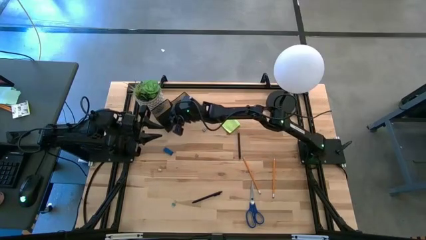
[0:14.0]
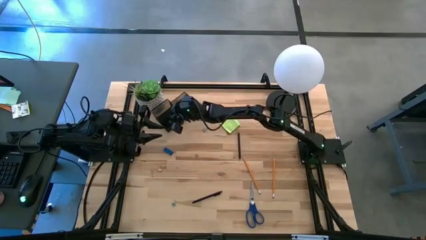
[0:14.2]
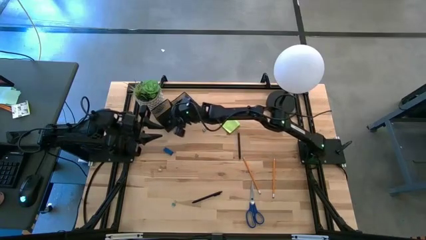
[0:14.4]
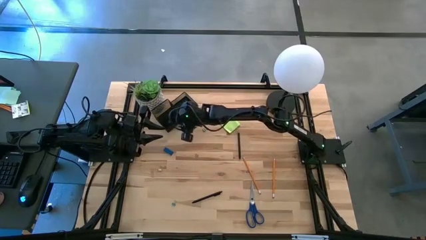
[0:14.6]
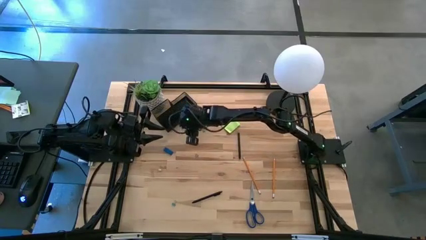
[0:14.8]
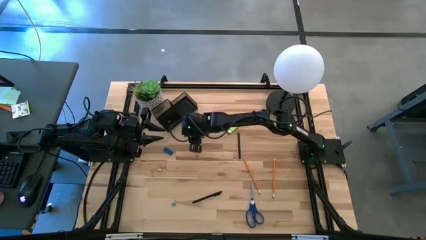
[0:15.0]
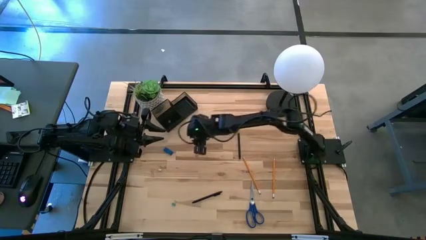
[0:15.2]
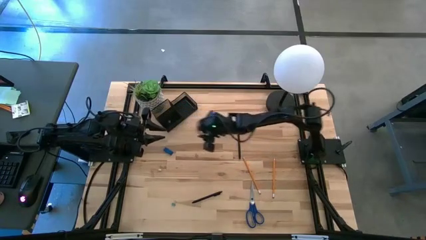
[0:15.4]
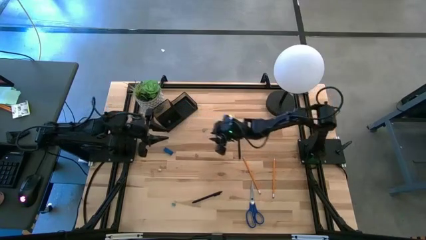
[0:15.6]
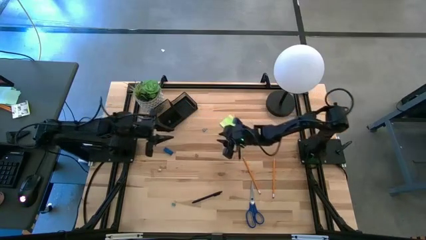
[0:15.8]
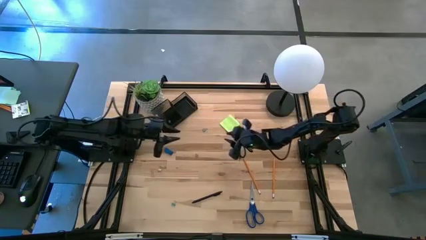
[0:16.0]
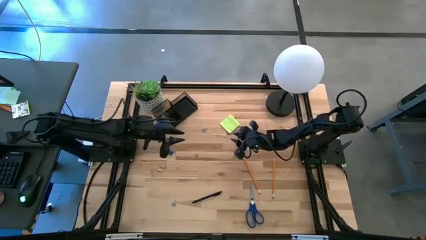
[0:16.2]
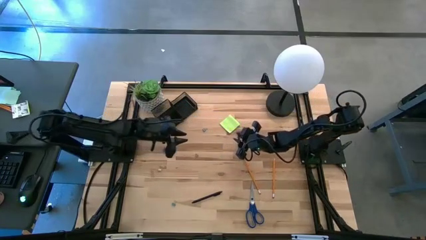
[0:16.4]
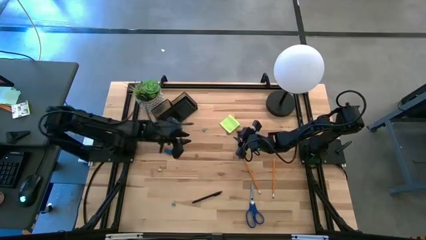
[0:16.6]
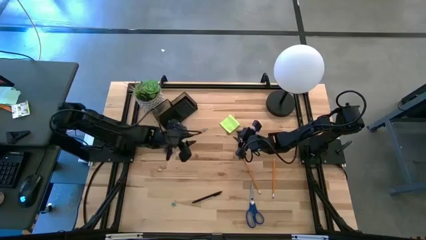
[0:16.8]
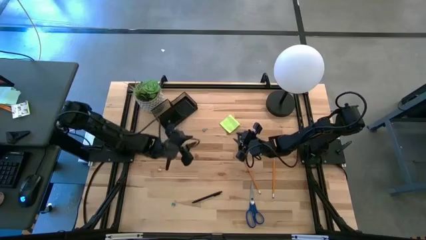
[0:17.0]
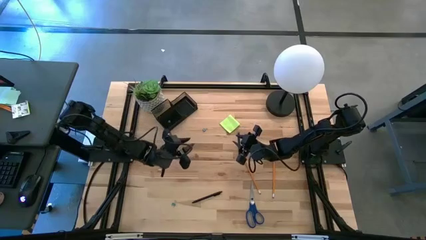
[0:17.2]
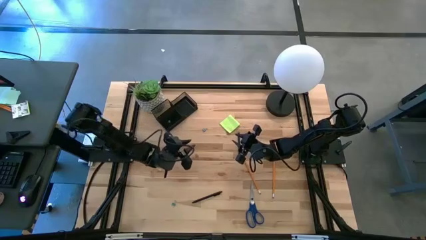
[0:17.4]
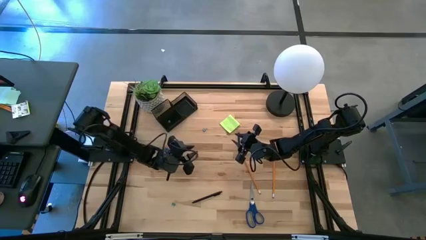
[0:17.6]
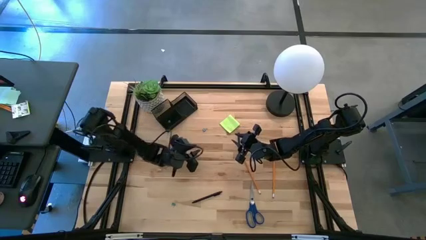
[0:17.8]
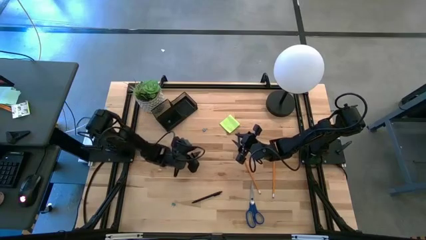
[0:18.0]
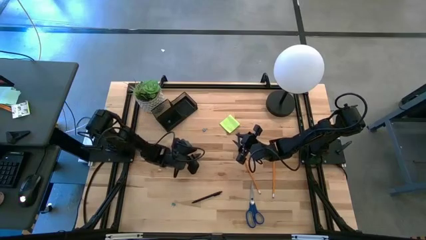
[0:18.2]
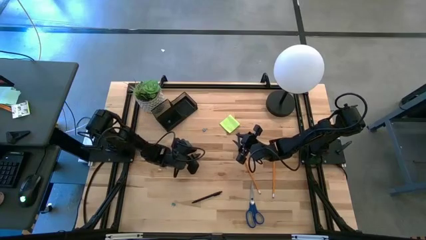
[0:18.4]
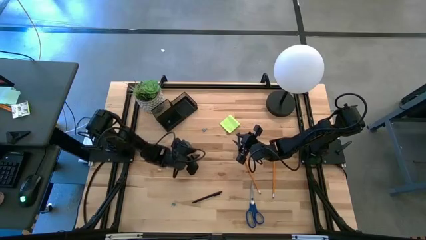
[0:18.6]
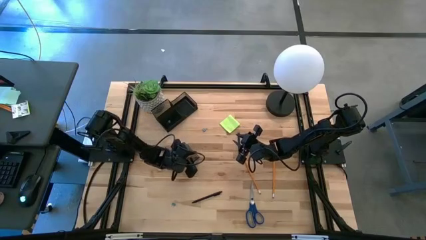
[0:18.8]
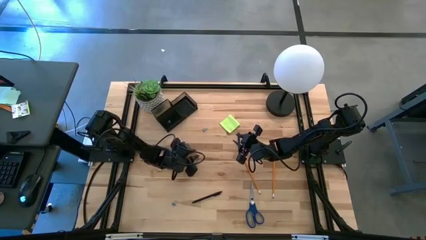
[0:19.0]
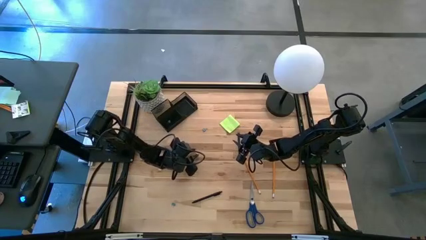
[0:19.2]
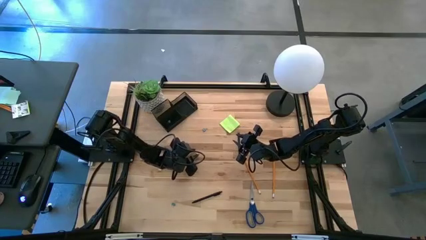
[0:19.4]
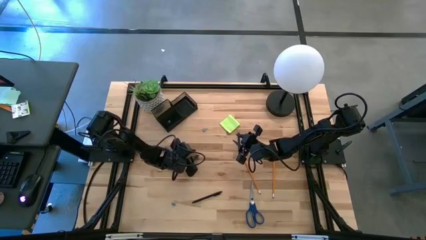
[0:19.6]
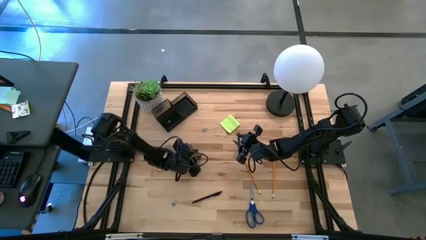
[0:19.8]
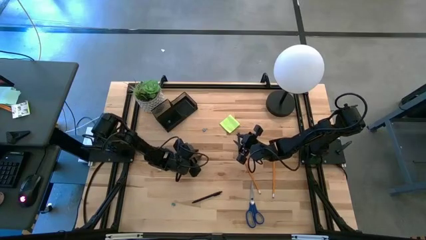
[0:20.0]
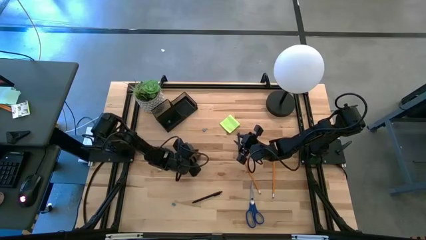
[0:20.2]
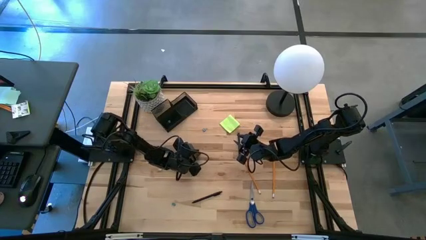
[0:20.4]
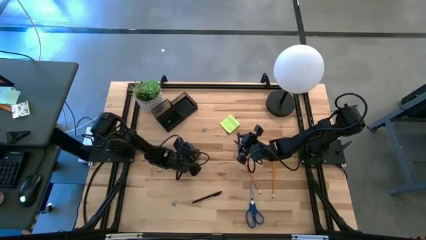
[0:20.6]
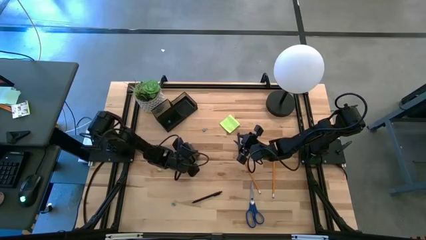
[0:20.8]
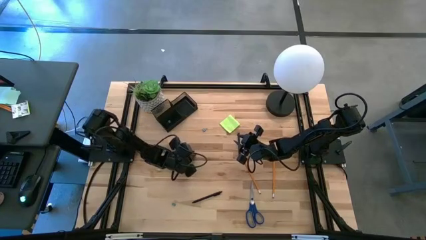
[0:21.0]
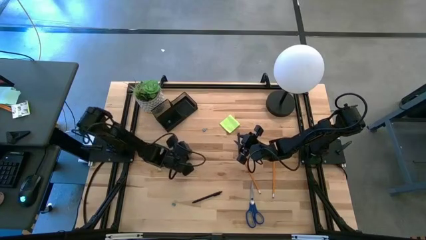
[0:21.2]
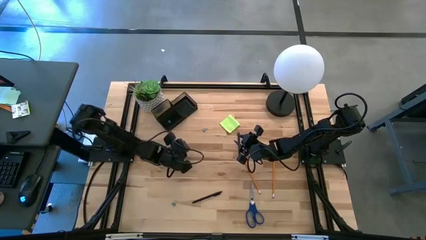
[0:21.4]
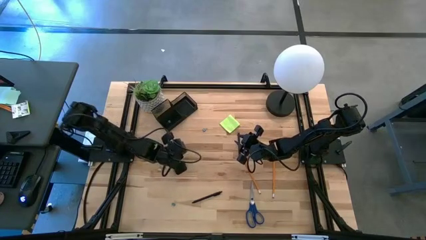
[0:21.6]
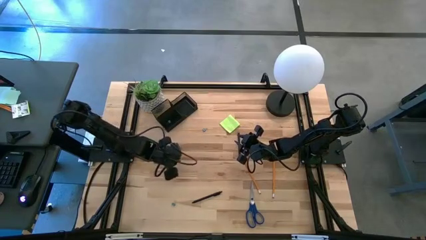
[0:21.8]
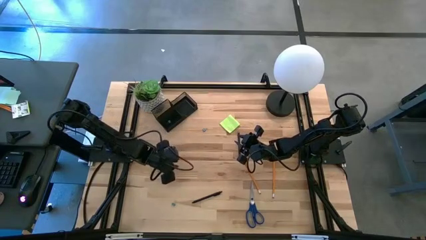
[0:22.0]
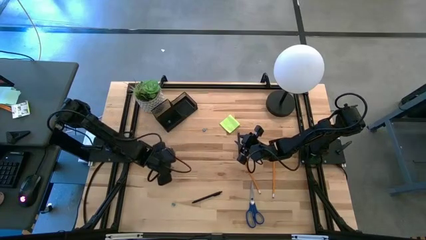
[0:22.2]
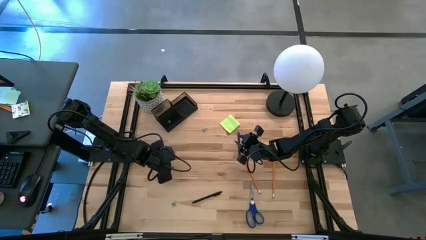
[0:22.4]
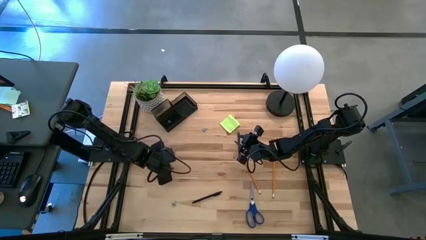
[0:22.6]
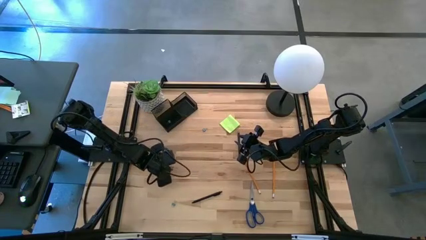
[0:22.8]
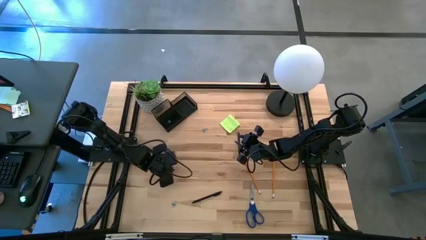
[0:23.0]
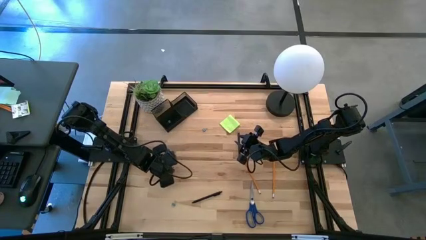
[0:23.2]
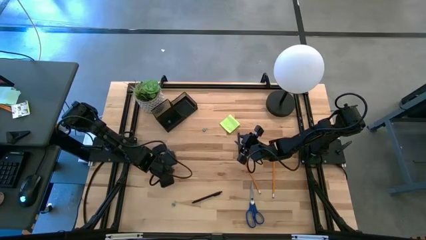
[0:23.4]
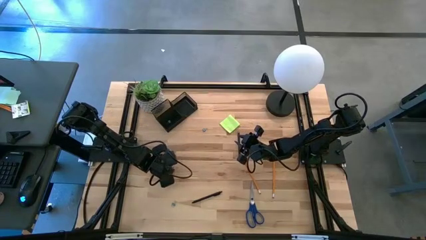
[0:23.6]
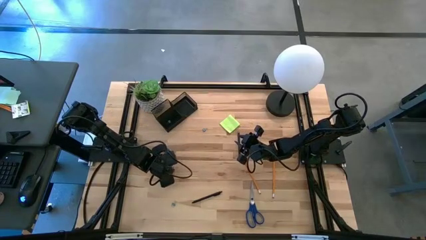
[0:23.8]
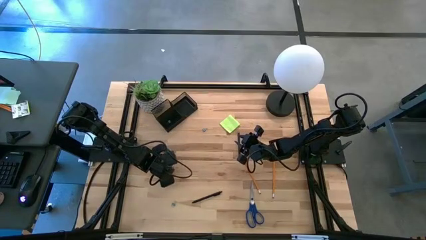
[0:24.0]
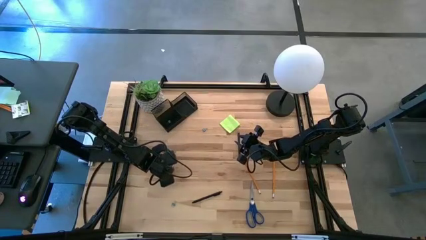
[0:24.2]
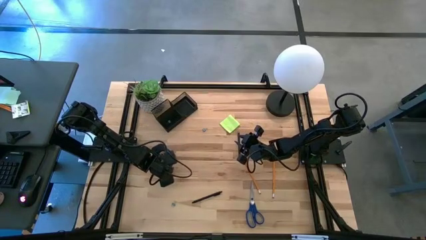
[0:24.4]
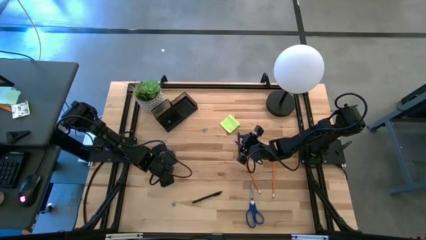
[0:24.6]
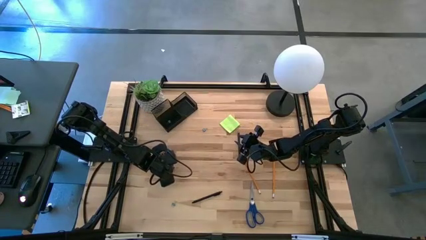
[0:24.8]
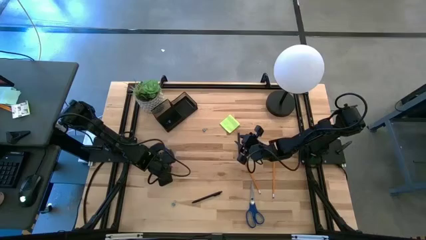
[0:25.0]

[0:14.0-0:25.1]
Task: Pick and place office supplies into organizer
Put the yellow binder clip into the desk organizer

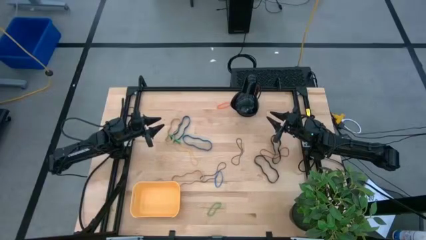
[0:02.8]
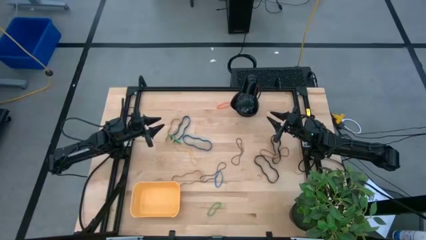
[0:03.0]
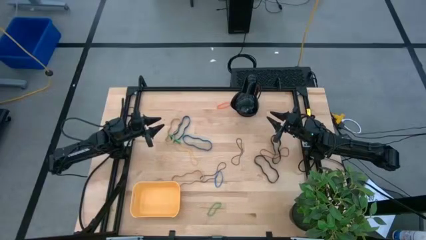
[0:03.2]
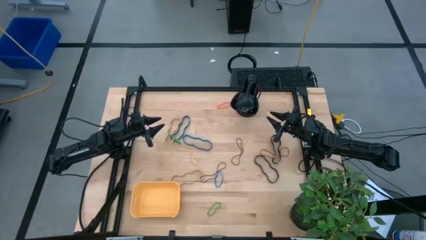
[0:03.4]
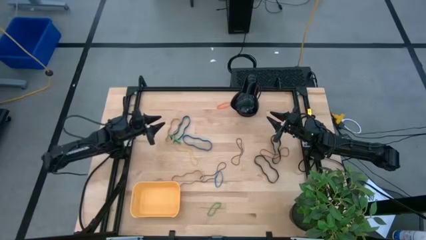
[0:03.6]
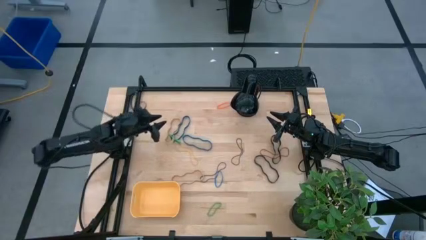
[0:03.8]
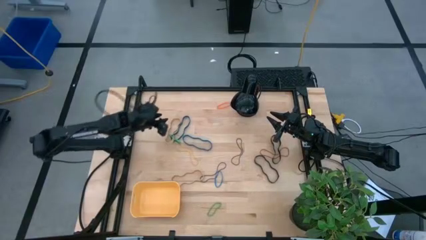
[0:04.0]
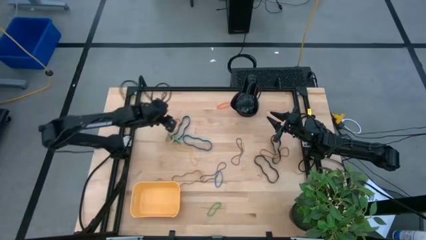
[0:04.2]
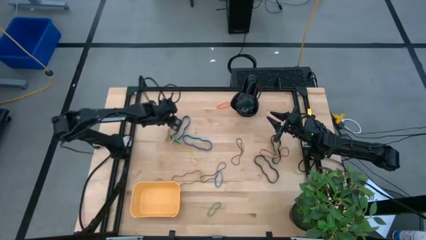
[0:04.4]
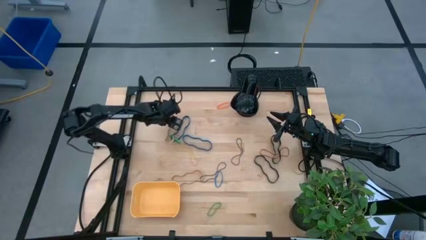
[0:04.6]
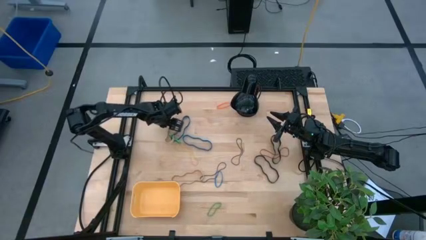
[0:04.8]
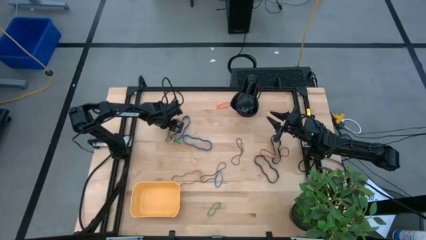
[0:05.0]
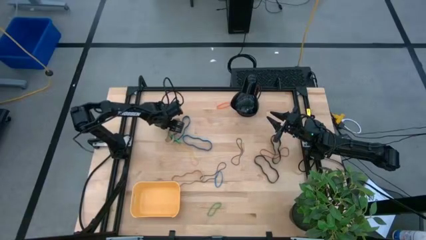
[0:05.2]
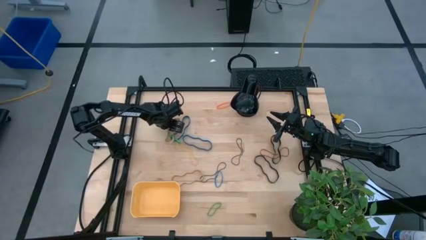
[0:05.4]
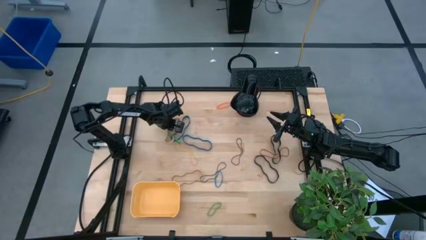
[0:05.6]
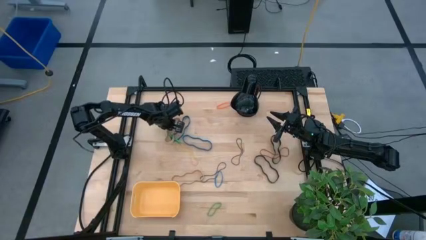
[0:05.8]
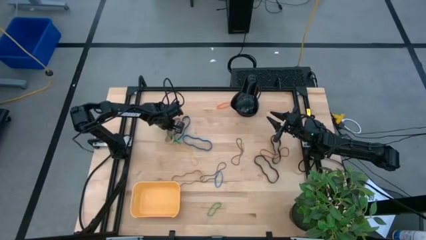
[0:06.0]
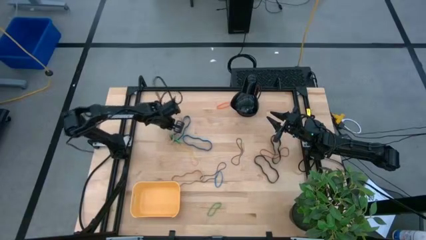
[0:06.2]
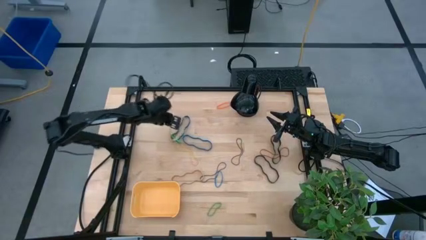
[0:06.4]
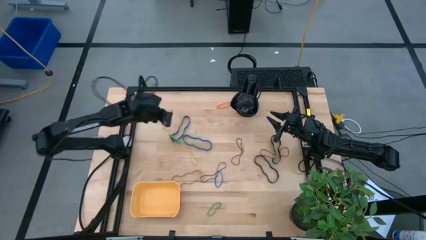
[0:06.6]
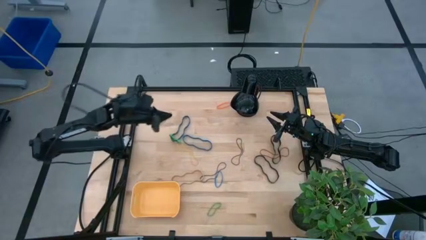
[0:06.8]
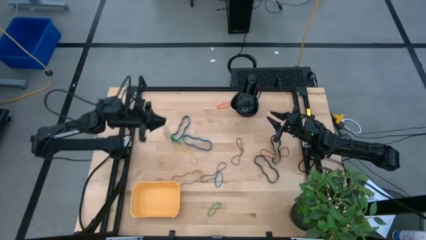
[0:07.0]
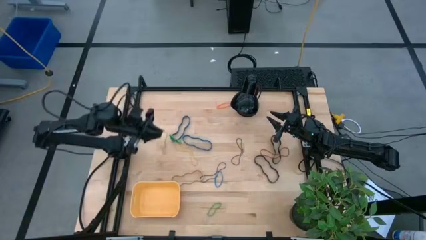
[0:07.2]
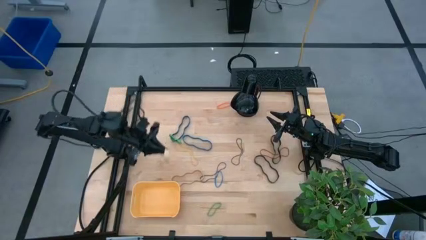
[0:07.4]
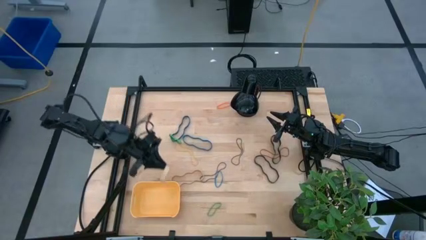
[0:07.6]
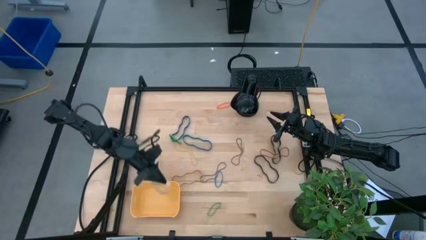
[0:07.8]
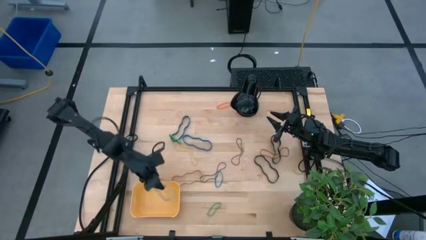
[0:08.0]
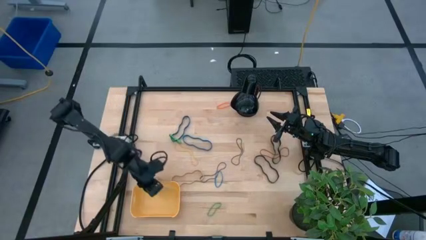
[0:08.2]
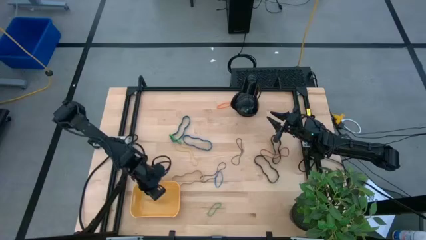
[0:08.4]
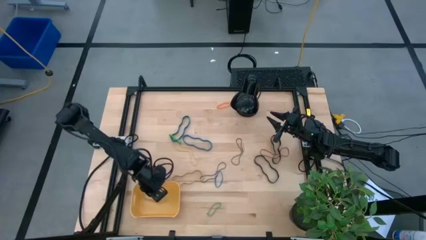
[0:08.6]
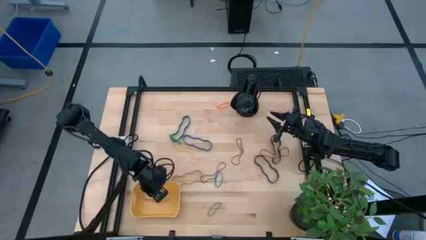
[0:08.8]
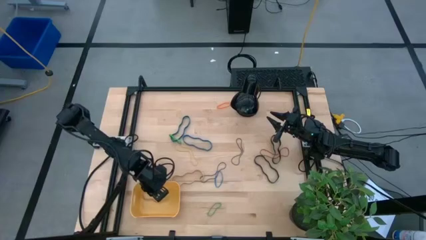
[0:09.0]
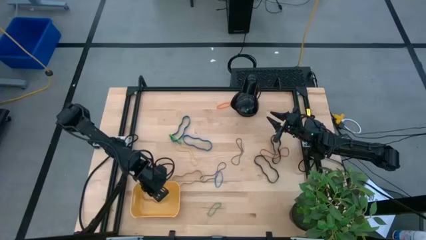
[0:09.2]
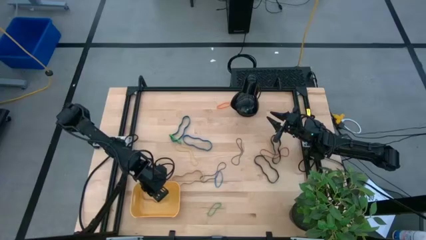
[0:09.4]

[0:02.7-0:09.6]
Task: Pick and place rubber bands into bin
Put the top light brown rubberband into the yellow bin
